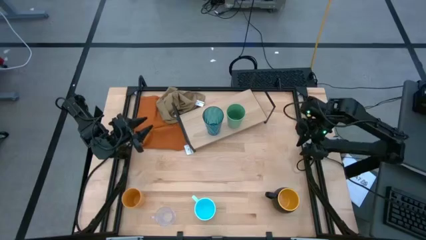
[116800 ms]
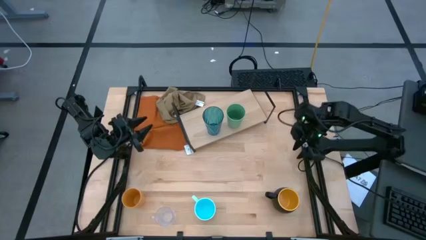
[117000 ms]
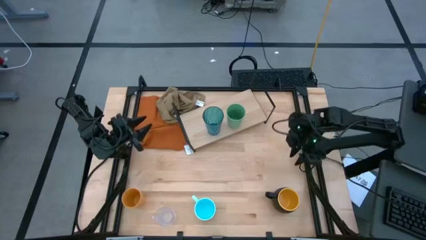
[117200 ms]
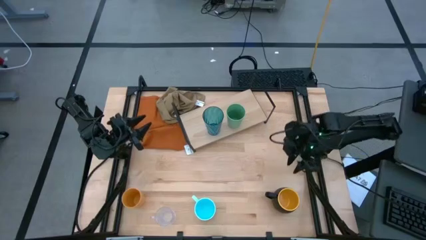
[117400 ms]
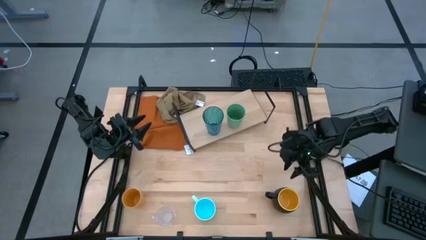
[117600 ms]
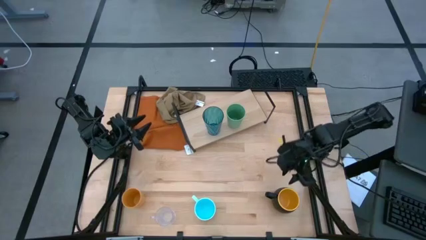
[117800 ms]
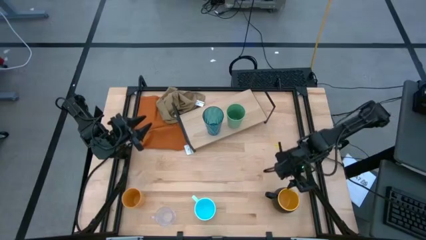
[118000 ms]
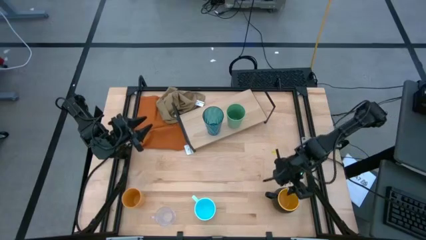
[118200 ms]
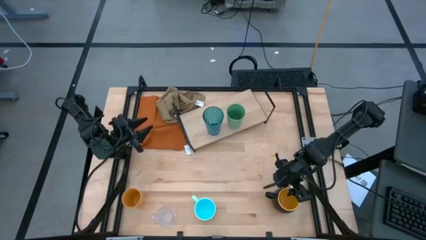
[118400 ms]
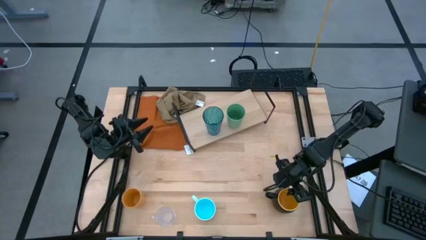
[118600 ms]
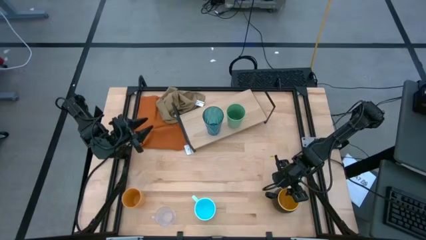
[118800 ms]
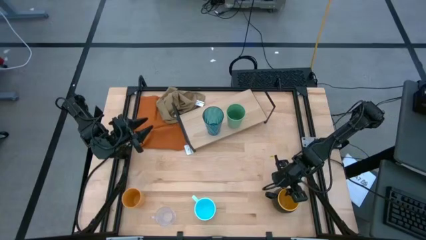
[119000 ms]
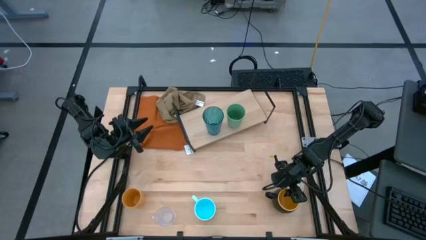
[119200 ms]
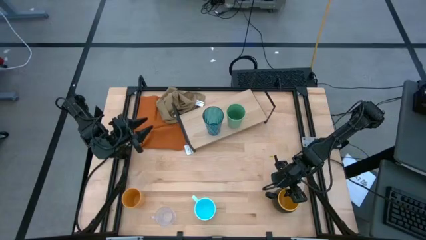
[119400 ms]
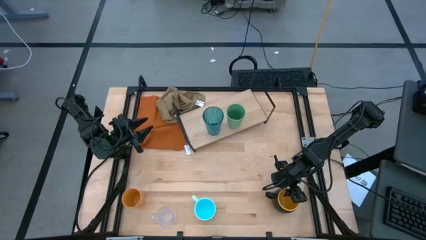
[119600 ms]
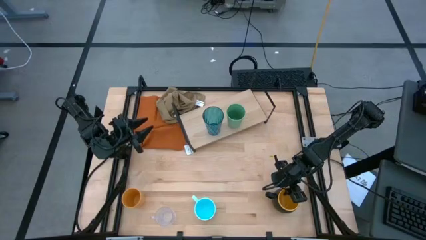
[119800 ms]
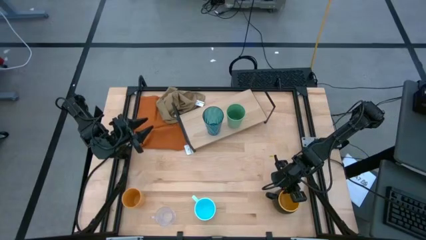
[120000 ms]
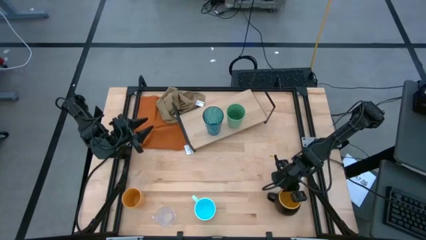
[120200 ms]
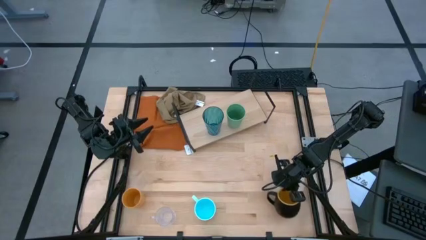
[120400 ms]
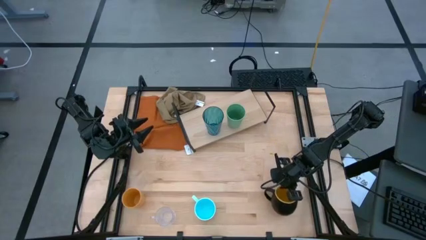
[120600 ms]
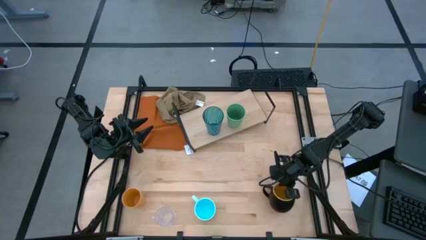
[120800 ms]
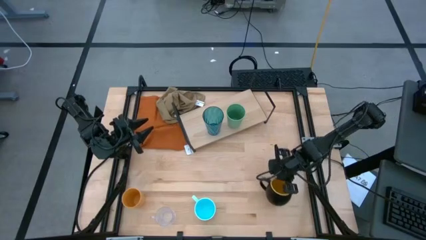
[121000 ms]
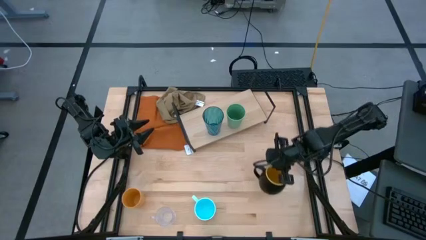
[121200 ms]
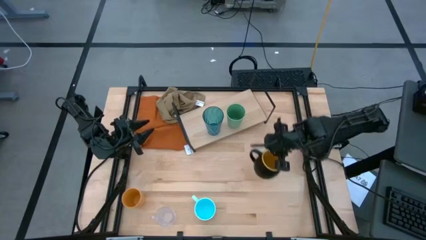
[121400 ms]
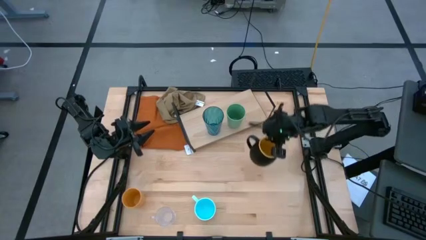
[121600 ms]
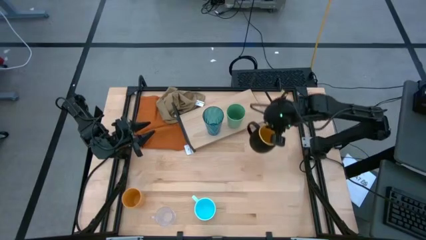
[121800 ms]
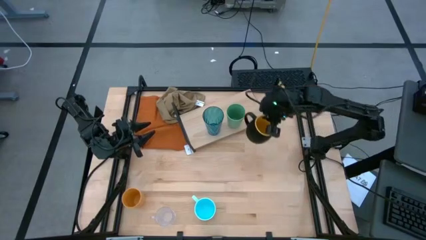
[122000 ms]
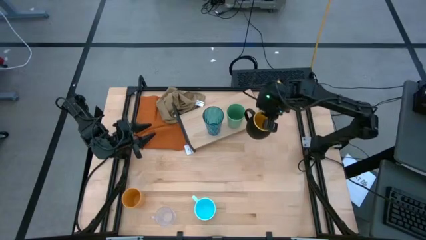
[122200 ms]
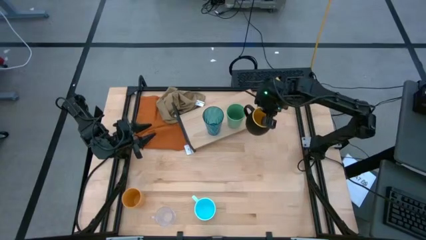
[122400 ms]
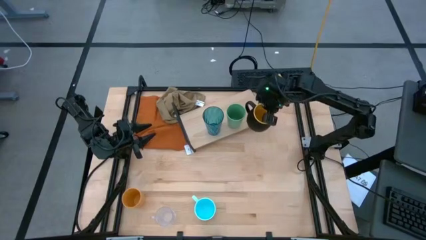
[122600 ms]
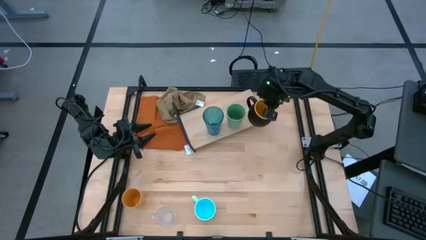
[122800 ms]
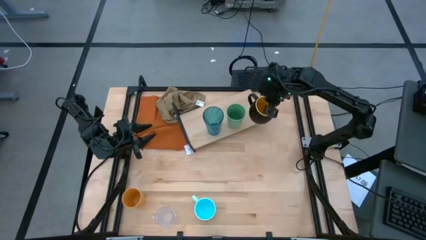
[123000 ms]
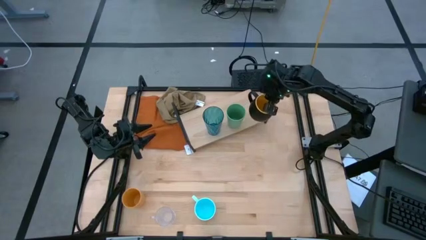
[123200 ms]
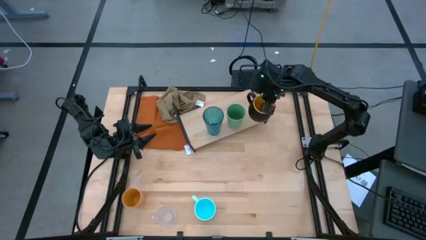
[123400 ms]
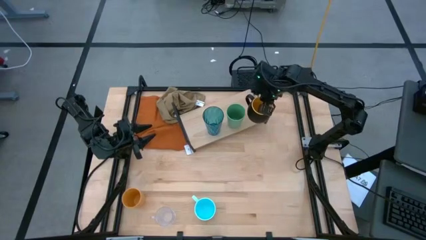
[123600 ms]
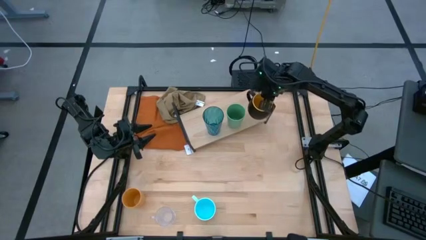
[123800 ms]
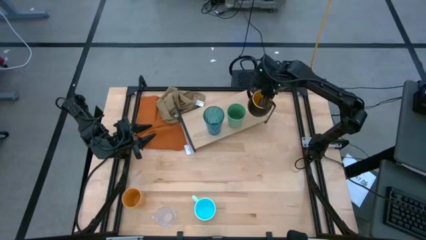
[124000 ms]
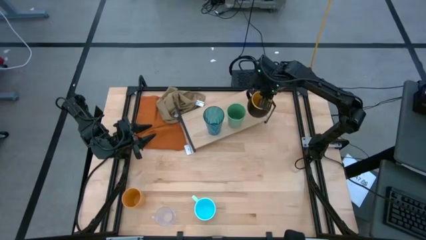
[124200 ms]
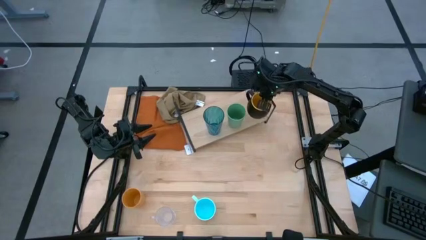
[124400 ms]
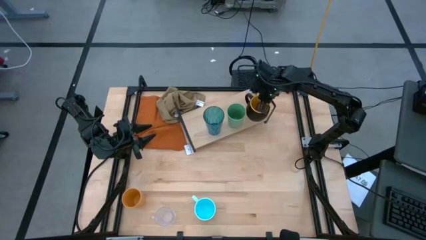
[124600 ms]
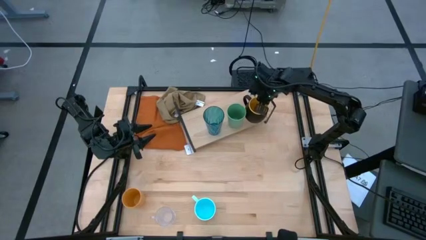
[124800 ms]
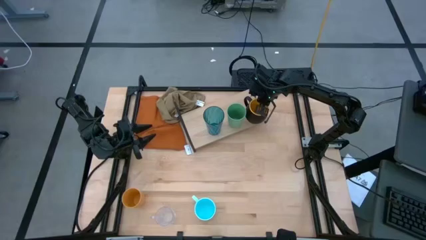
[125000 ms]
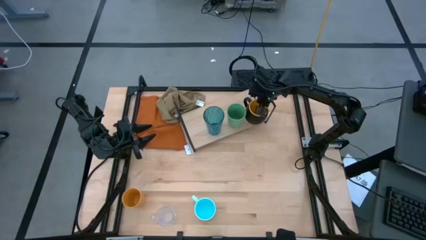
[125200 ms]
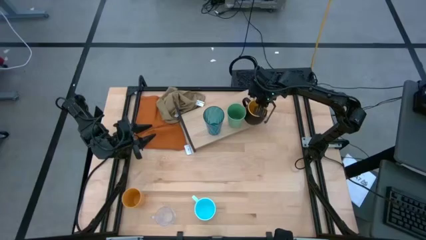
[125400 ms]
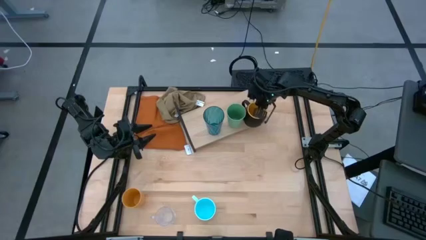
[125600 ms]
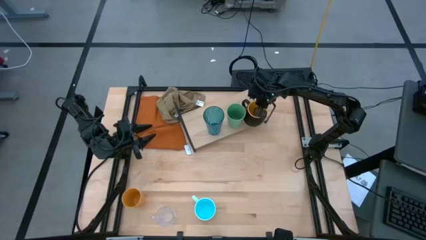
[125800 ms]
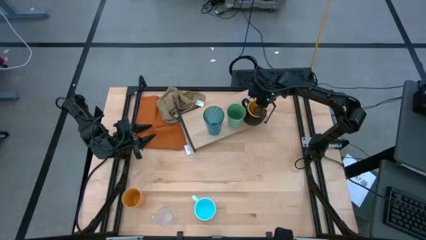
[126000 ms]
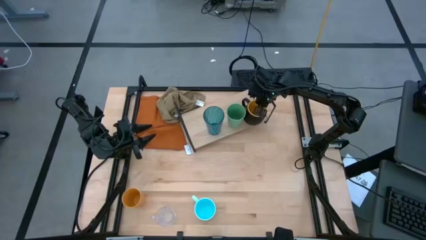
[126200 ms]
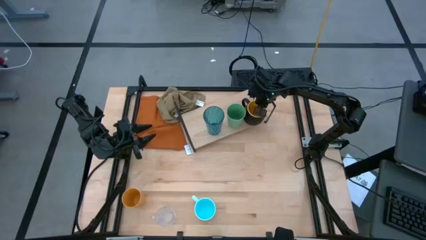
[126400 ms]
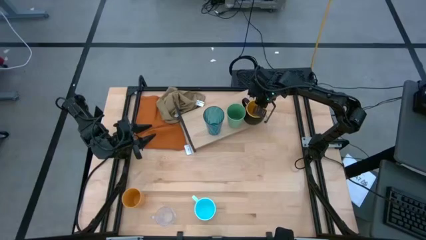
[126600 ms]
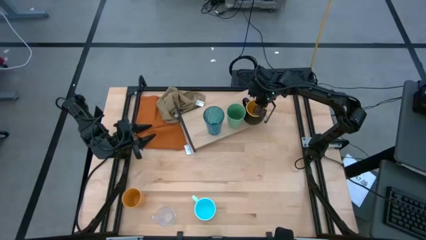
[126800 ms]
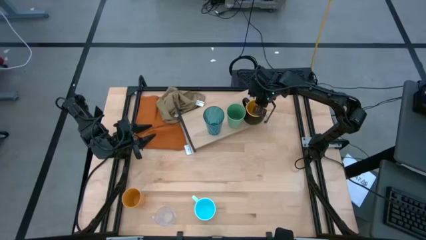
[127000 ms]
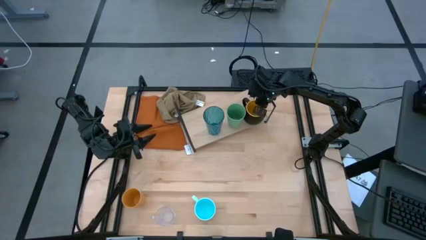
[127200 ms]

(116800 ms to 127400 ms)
Task: Stack small to large cups/mugs on shelf
Put the black mug on the shelf
